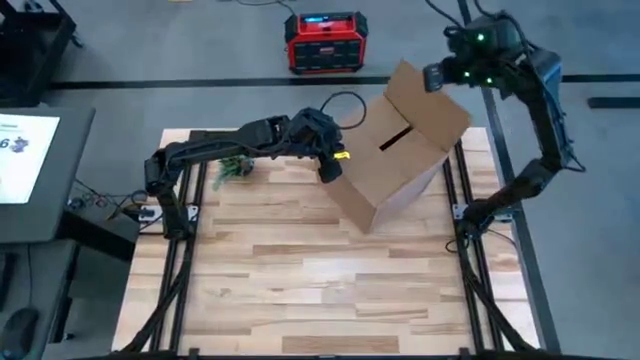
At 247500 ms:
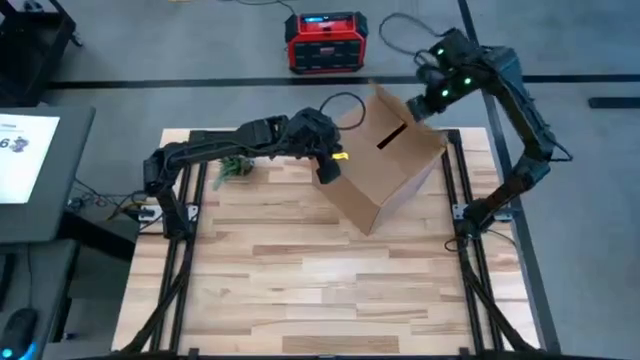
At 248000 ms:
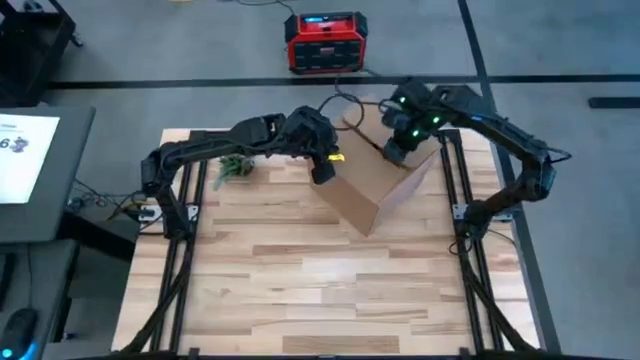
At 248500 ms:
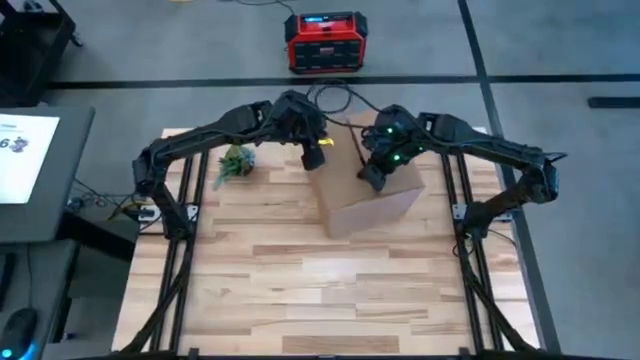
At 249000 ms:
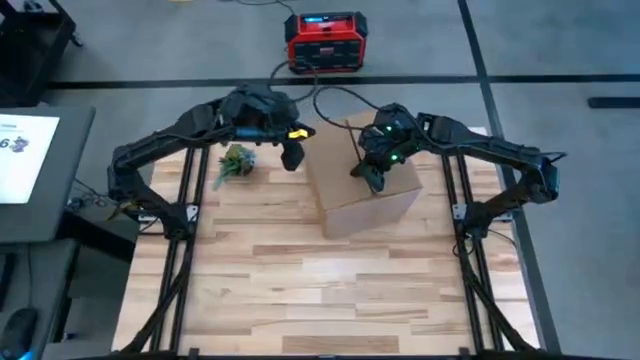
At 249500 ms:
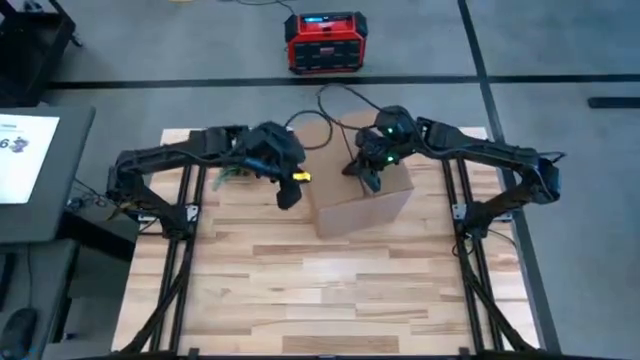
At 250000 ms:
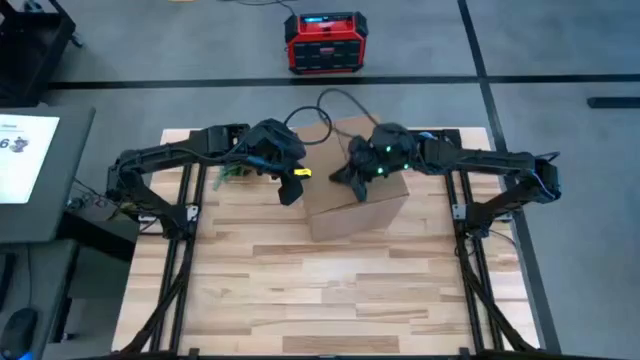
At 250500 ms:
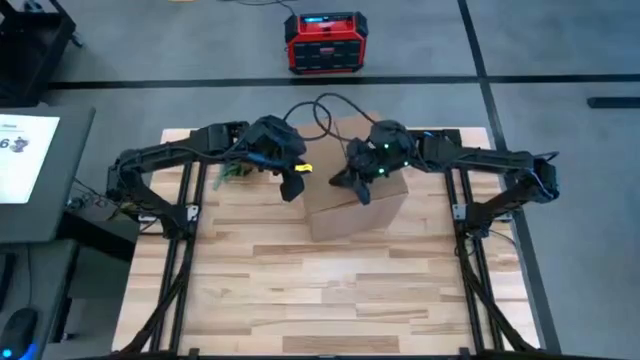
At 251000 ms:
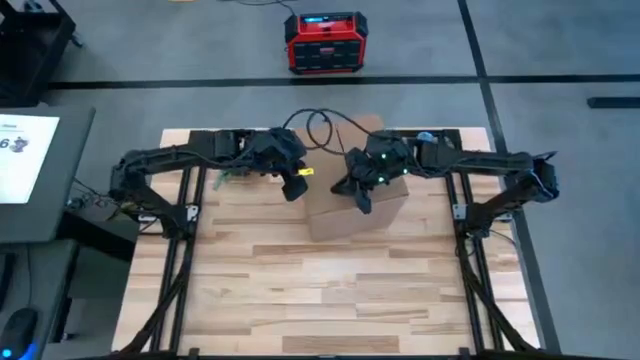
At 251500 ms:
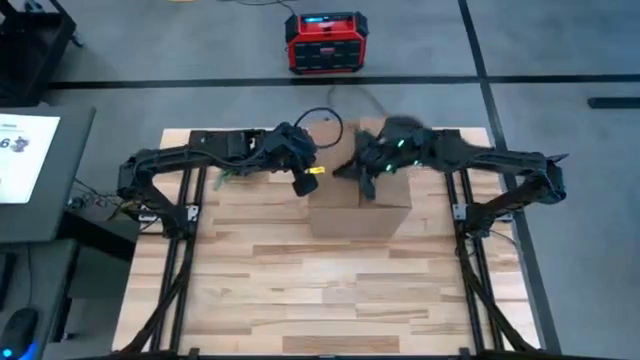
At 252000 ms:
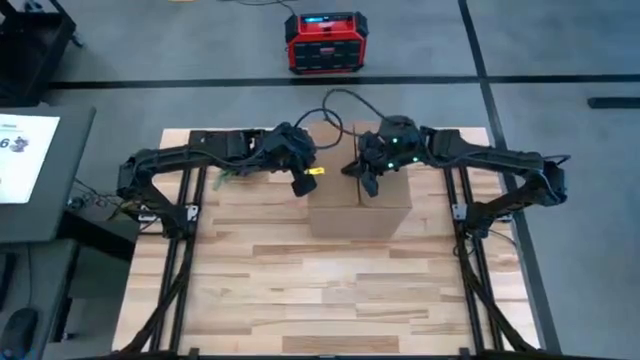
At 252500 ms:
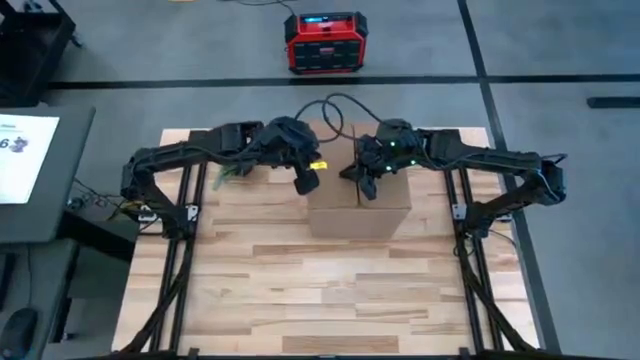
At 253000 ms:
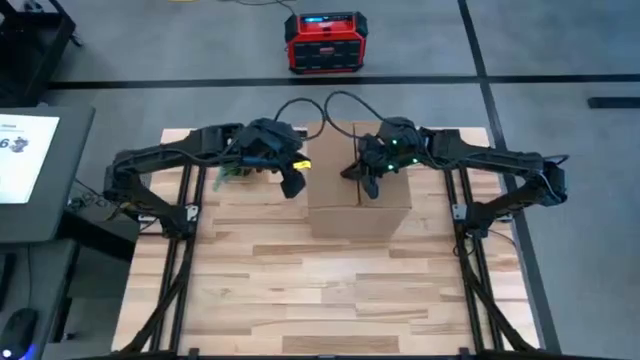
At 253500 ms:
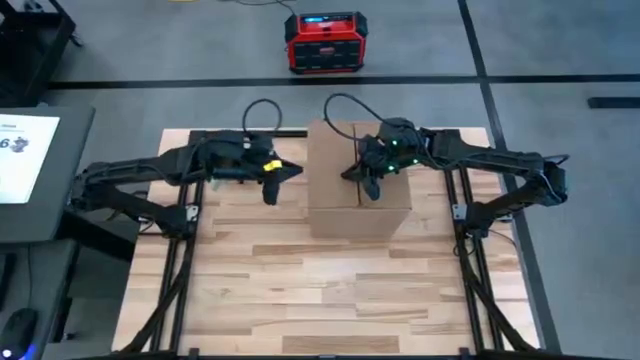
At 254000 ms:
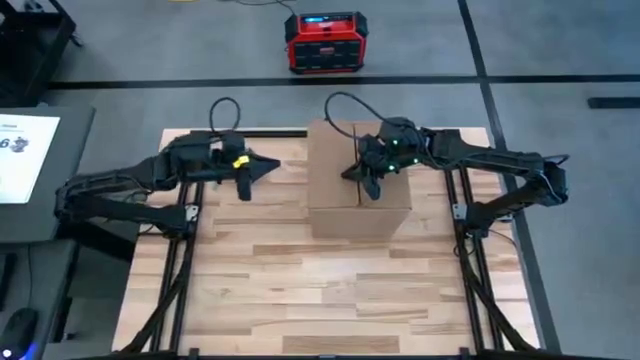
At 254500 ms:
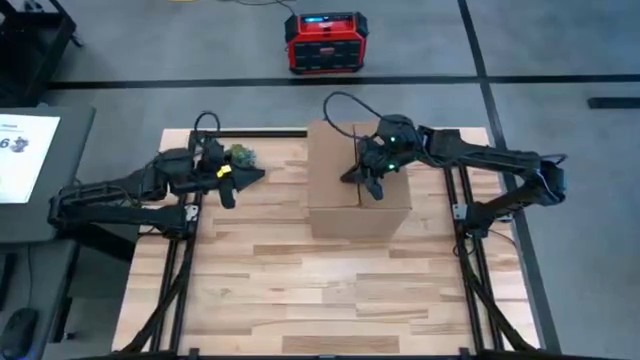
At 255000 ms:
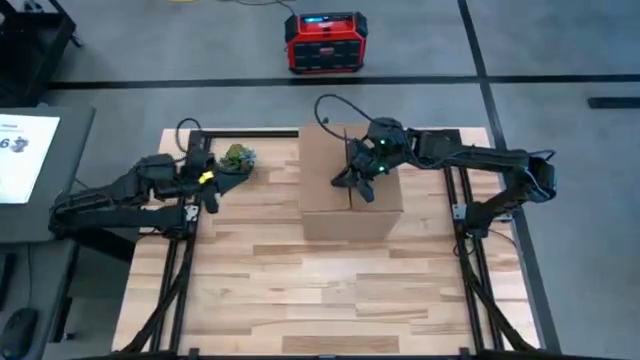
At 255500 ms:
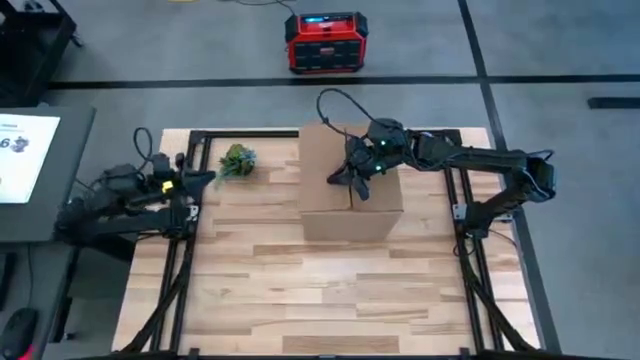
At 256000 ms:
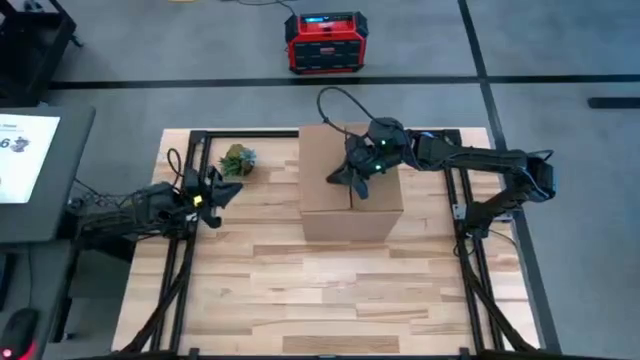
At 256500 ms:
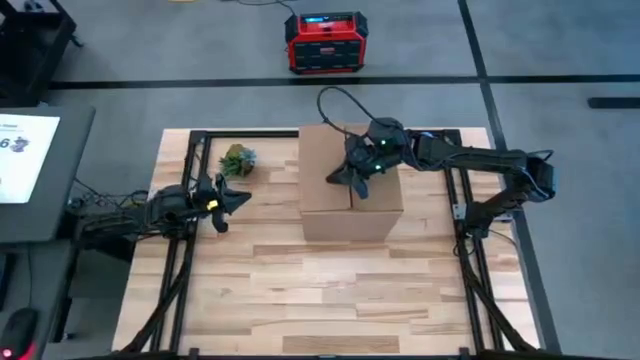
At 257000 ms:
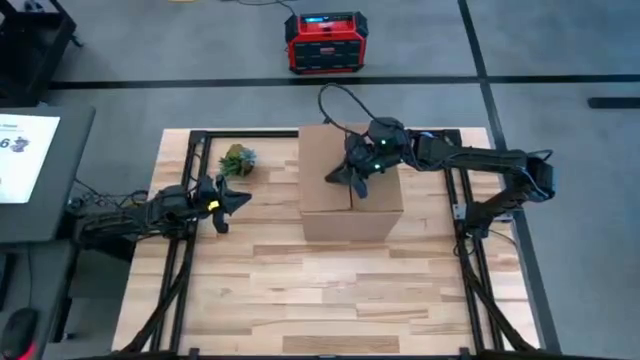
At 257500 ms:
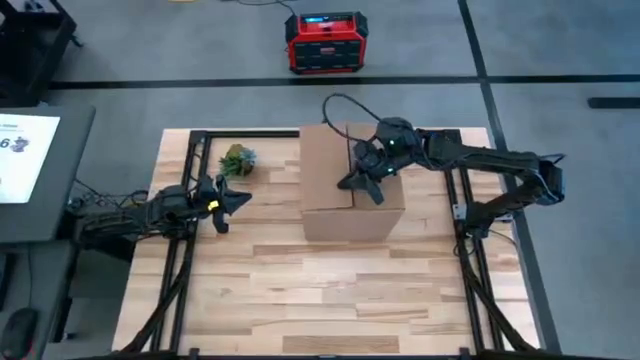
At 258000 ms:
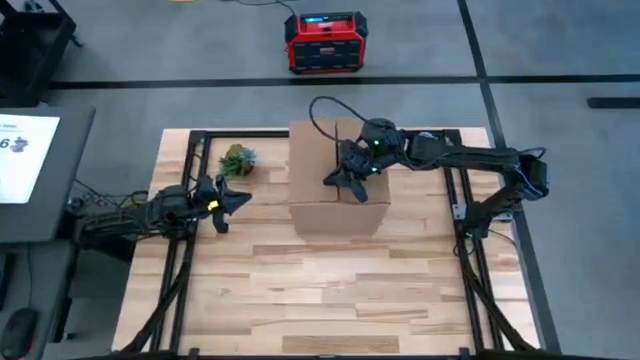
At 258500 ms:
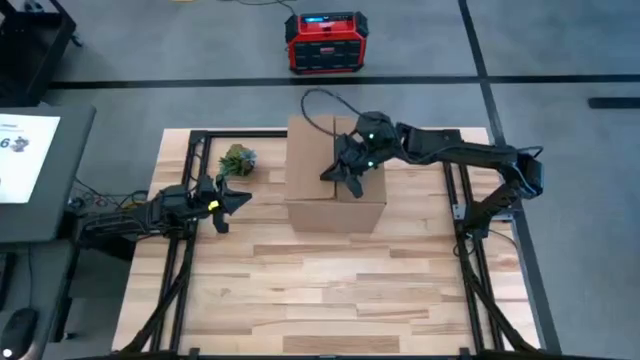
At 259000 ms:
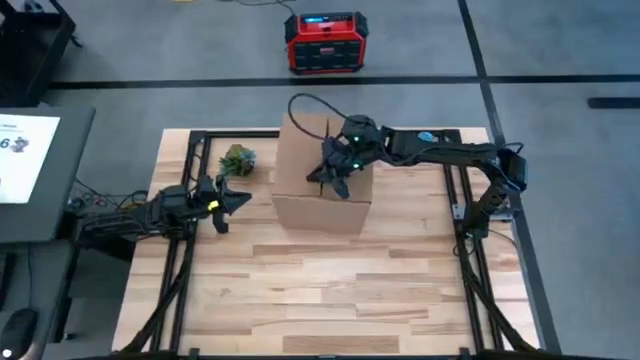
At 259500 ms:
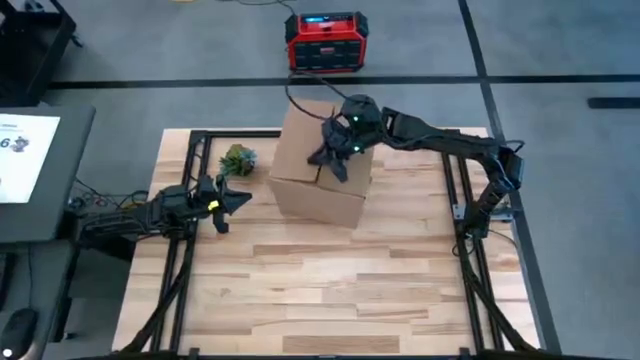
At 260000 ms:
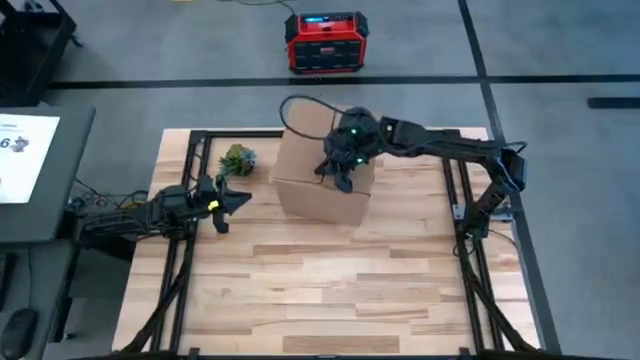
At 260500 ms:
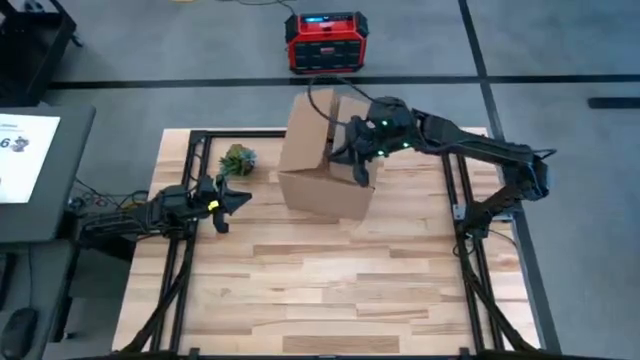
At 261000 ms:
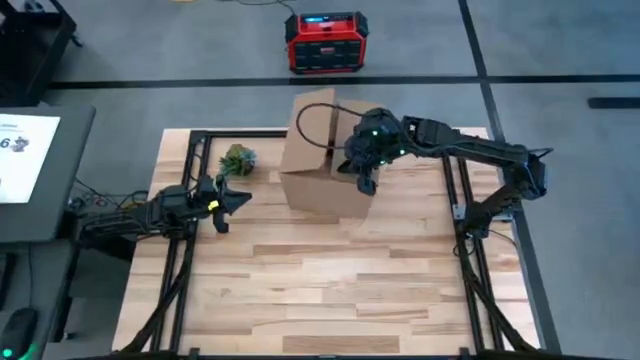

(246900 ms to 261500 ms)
Task: wrap mug
Close the cardboard box

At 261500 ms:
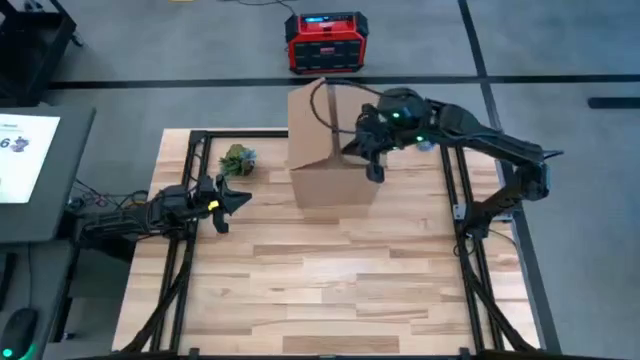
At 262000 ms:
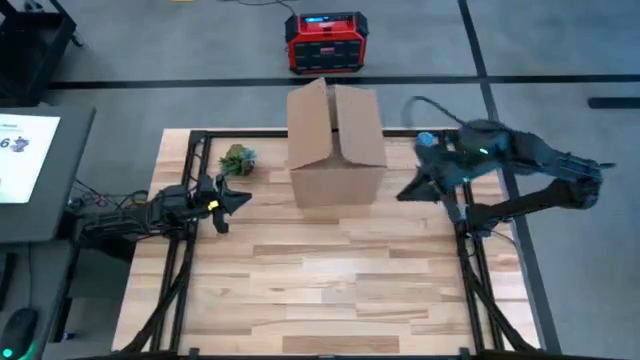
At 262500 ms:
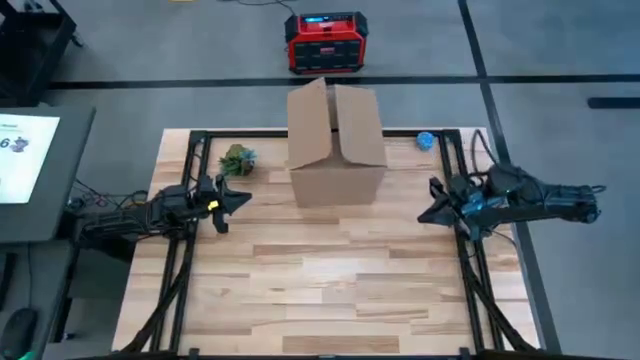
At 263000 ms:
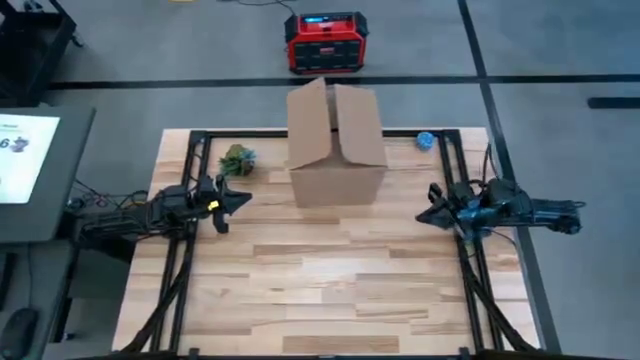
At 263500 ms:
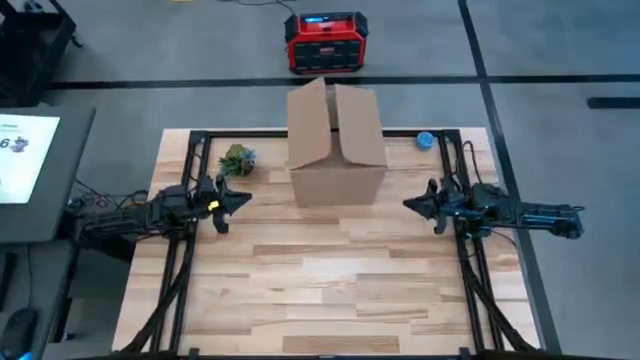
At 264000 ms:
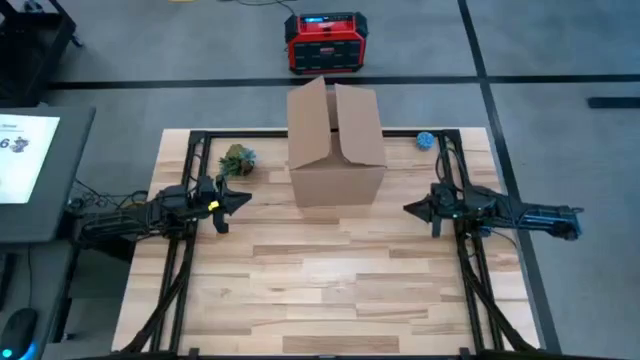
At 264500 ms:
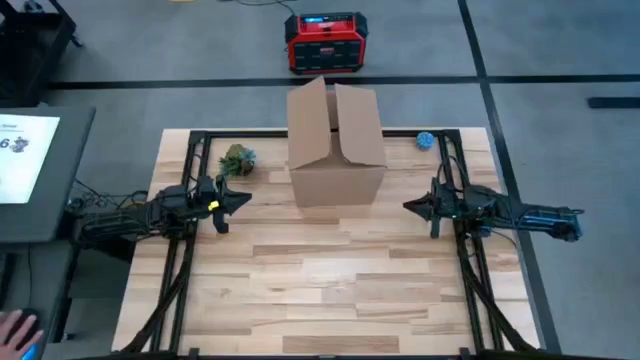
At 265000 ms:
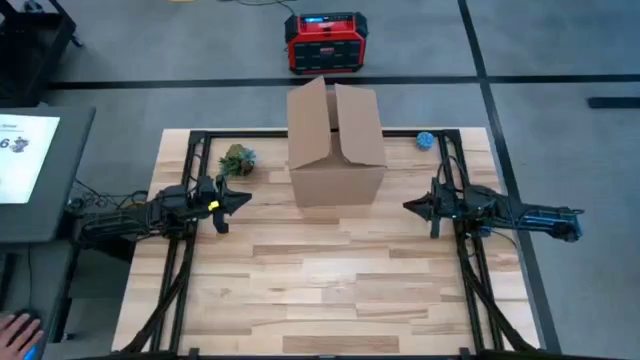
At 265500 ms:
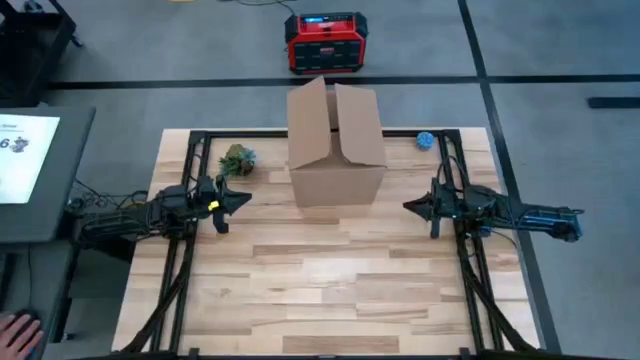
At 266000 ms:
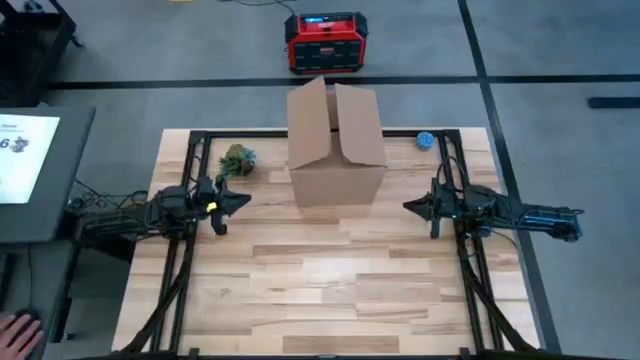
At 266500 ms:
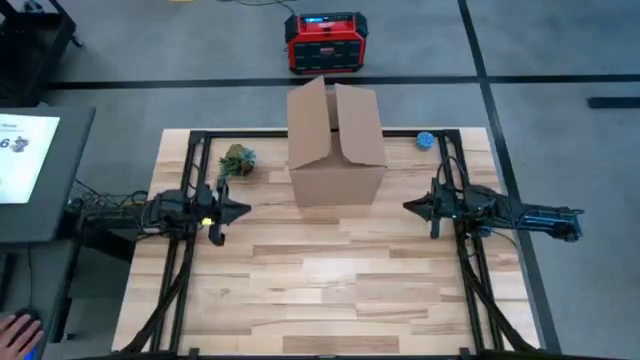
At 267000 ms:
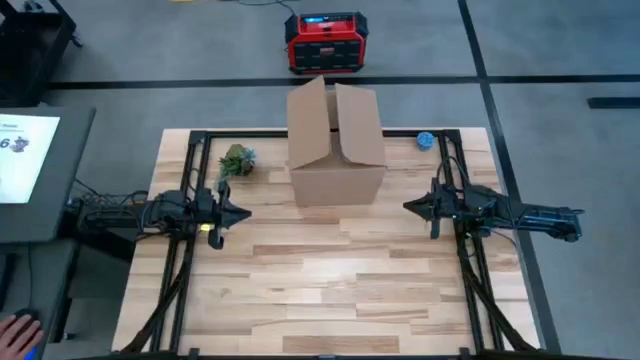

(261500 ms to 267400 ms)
Return to Home Position

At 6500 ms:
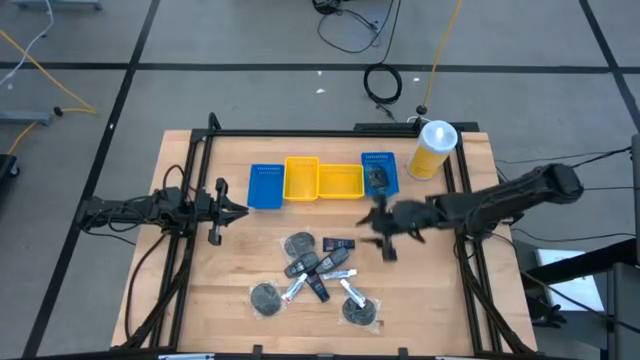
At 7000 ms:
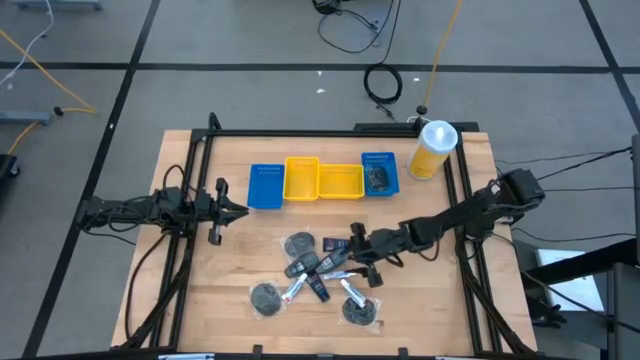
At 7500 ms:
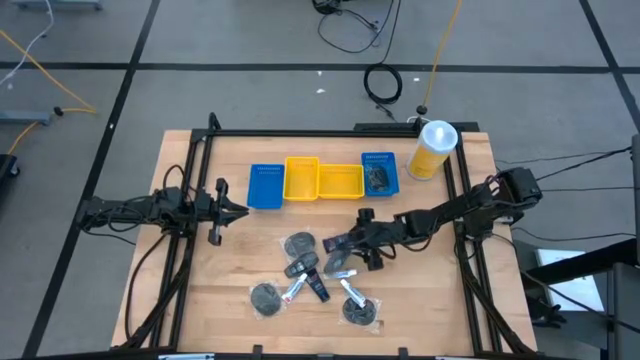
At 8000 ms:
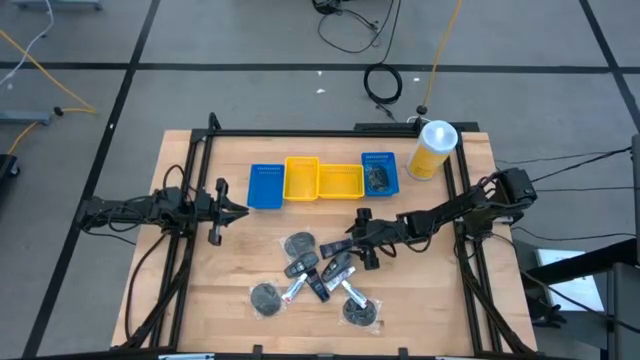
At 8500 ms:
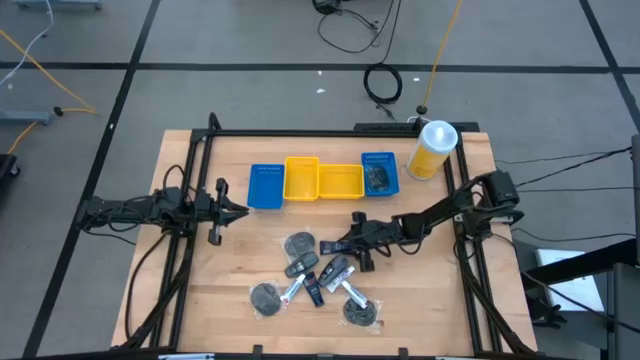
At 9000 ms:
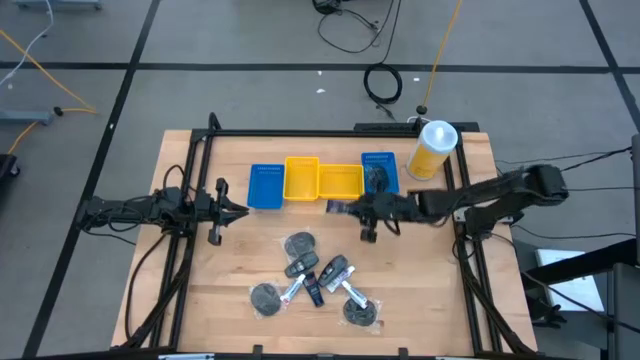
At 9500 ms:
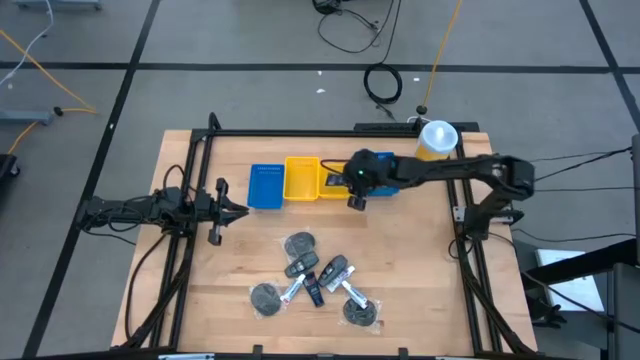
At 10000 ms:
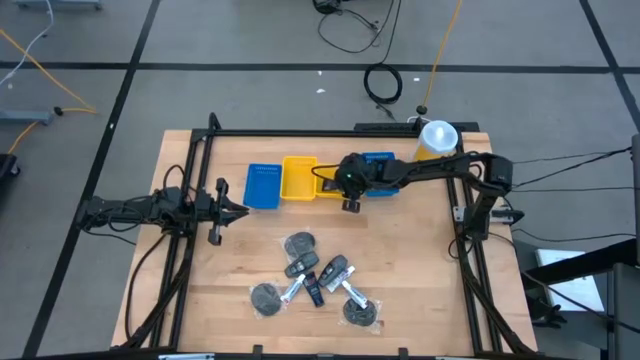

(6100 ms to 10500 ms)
Task: Pick & Place Travel size toiletries
Put the shaving cream into the right yellow basket
